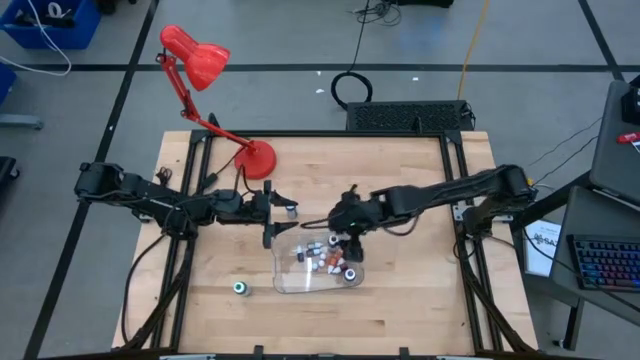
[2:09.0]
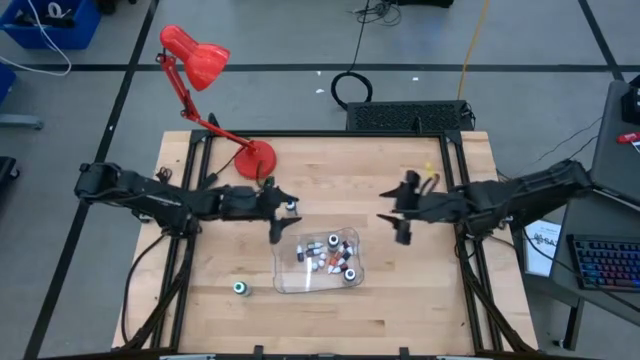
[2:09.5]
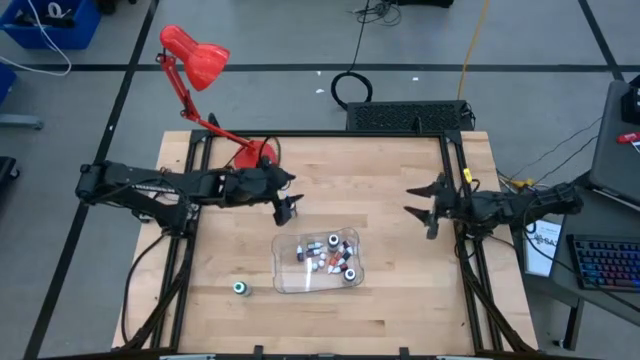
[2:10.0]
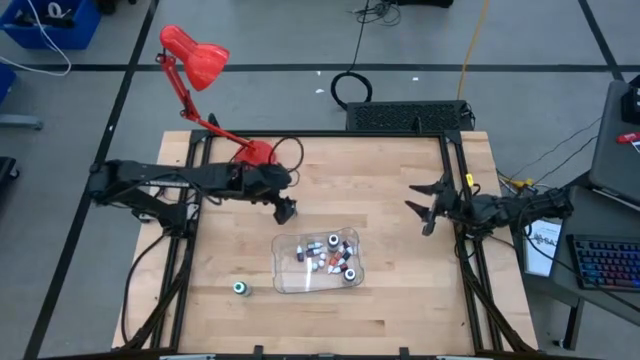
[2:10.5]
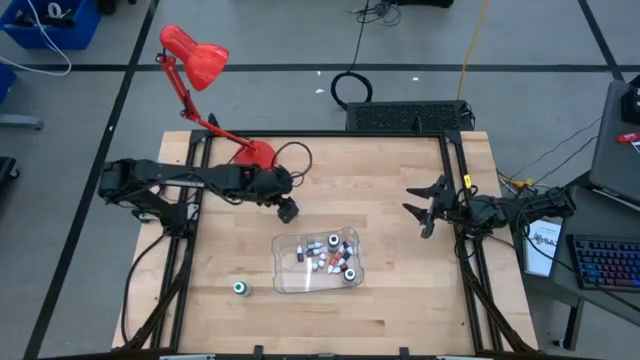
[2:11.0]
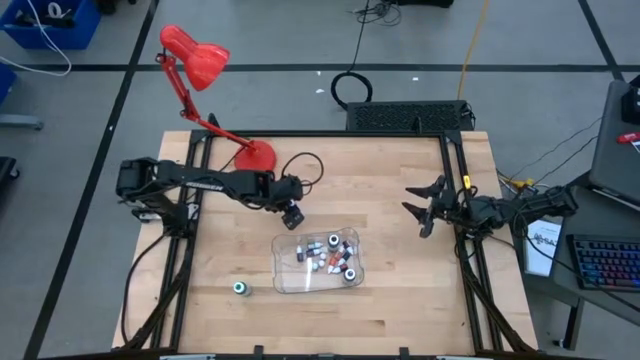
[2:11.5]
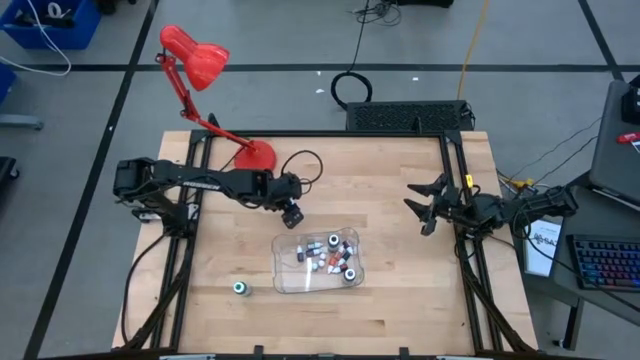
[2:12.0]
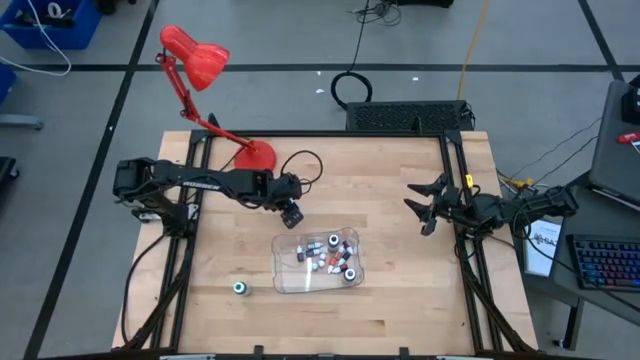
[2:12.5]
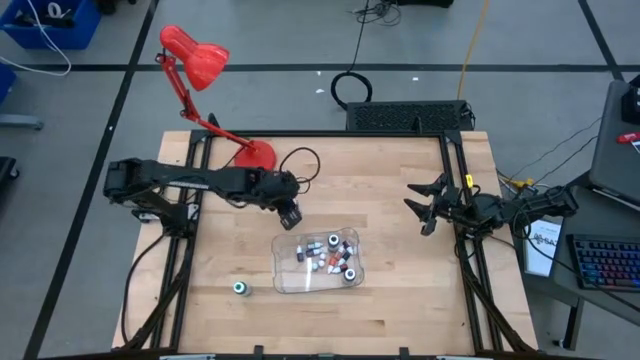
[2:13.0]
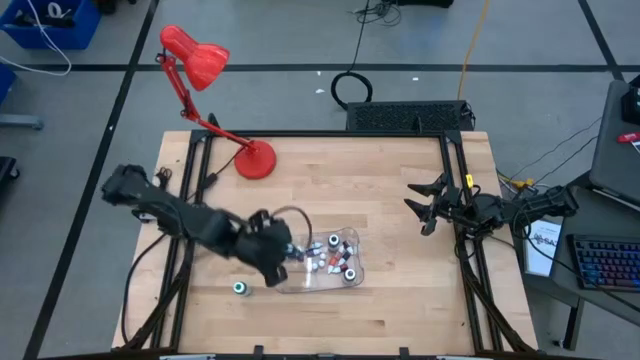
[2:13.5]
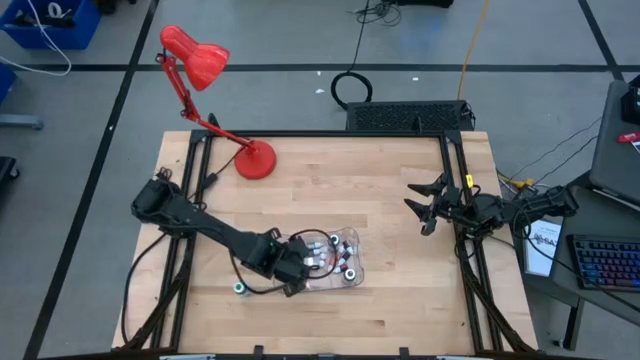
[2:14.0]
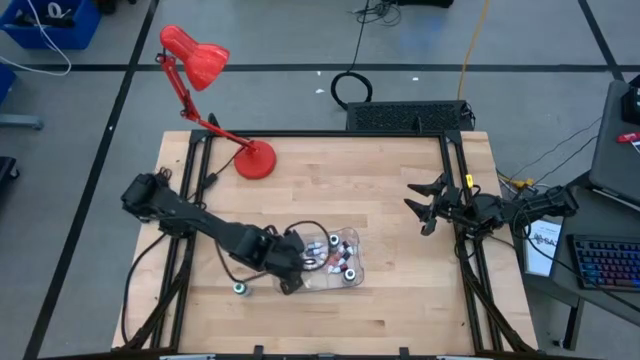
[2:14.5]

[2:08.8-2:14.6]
Task: Pick & Place food coloring
Put the large blue food coloring into the bin

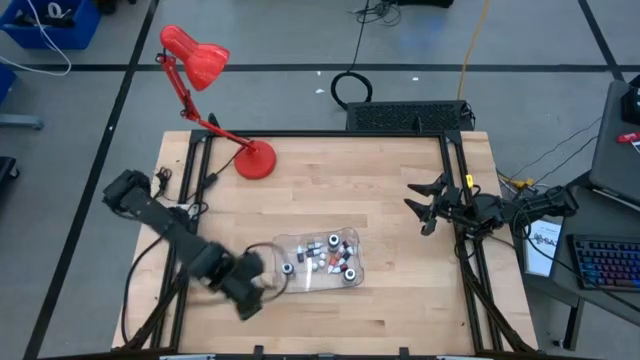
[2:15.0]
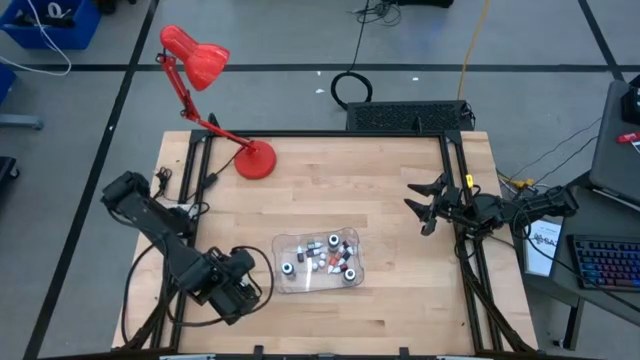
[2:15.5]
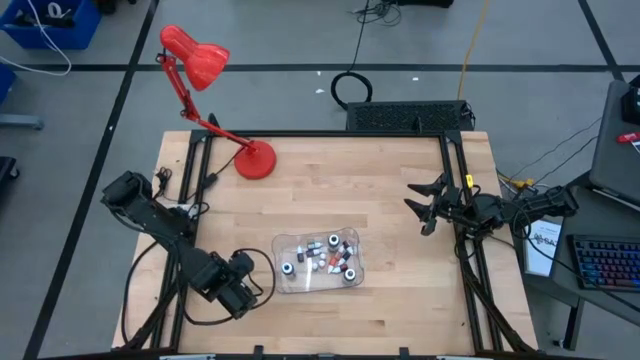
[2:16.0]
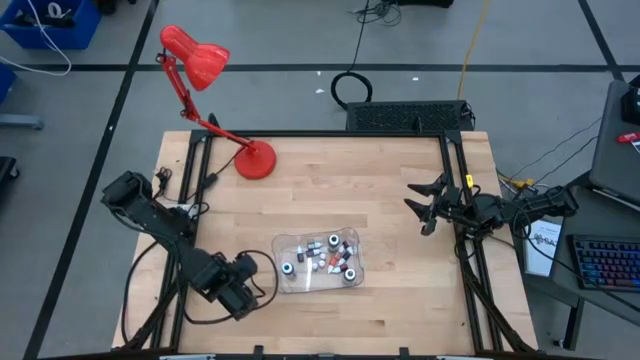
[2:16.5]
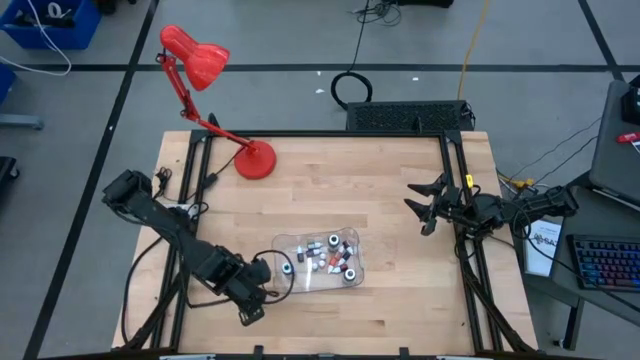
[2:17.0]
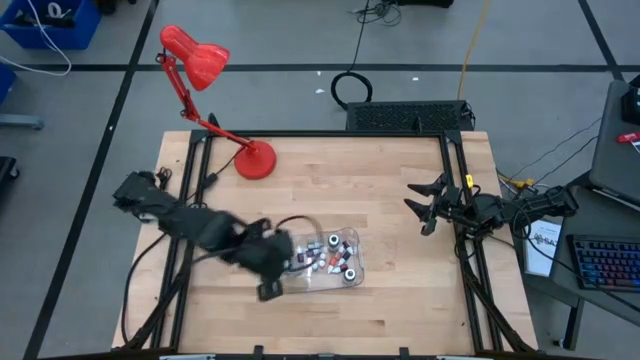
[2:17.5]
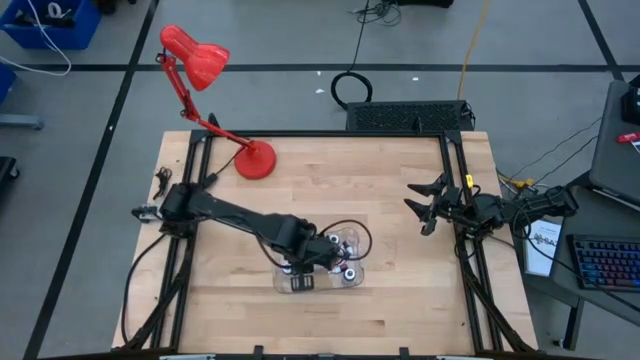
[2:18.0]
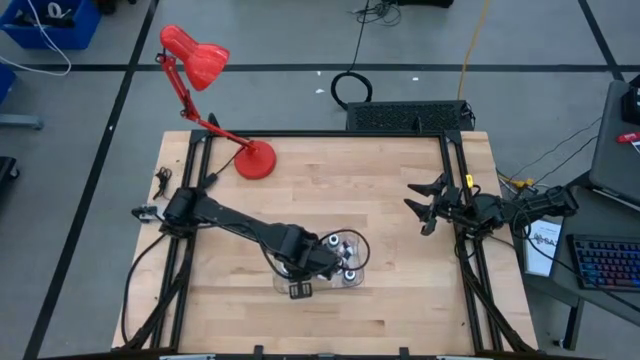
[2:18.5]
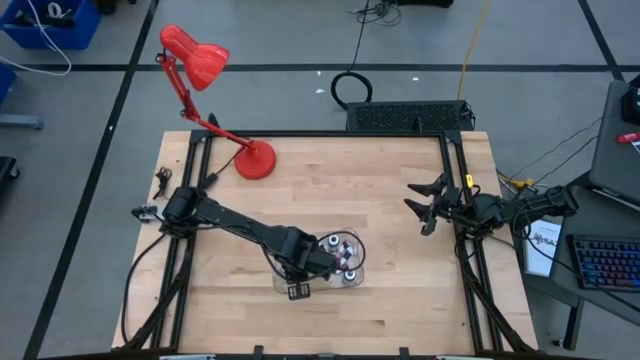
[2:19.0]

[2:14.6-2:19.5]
Put the large green food coloring into the bin

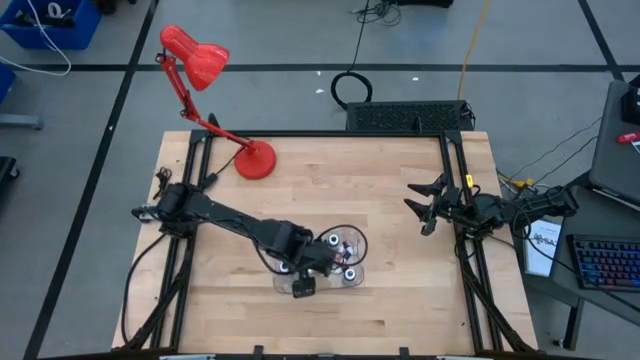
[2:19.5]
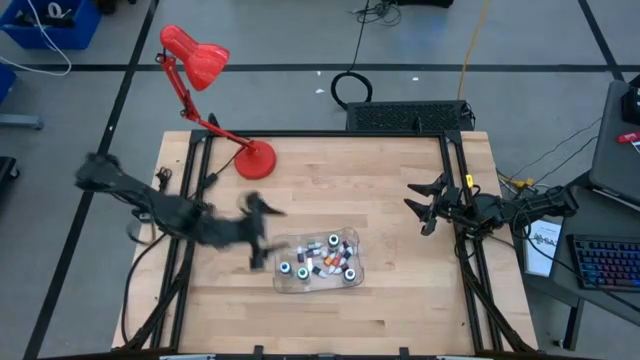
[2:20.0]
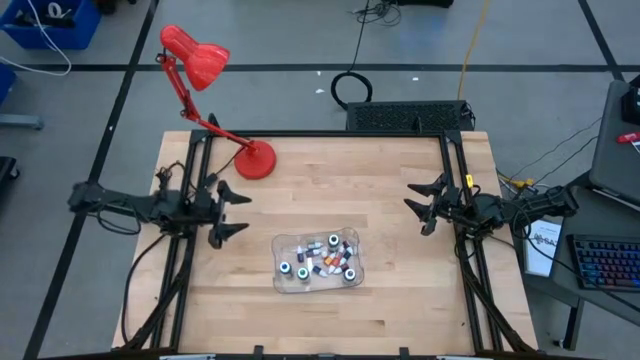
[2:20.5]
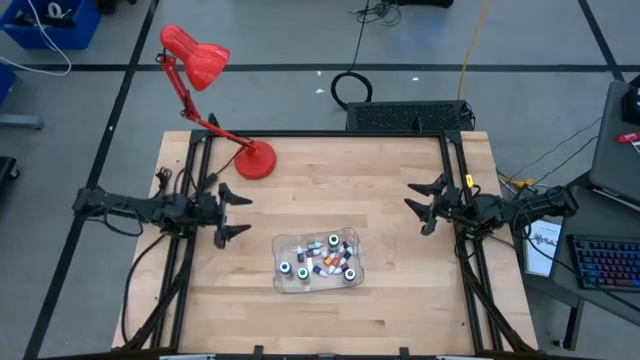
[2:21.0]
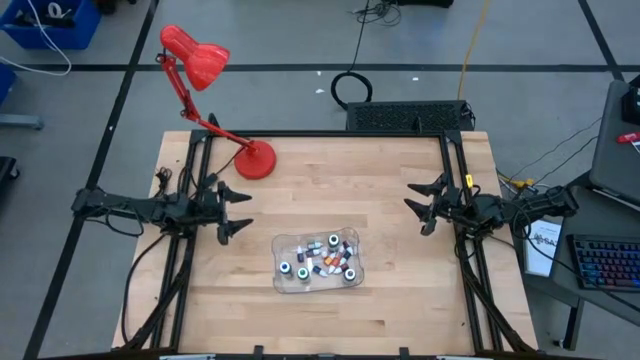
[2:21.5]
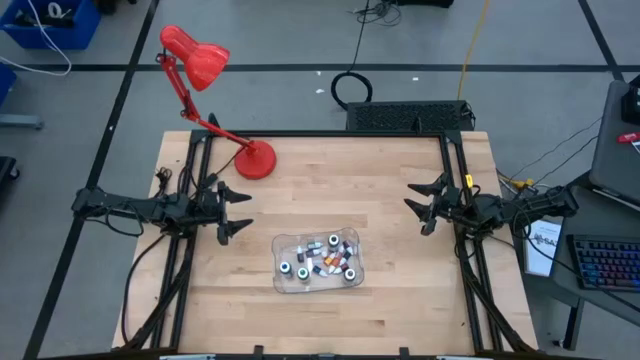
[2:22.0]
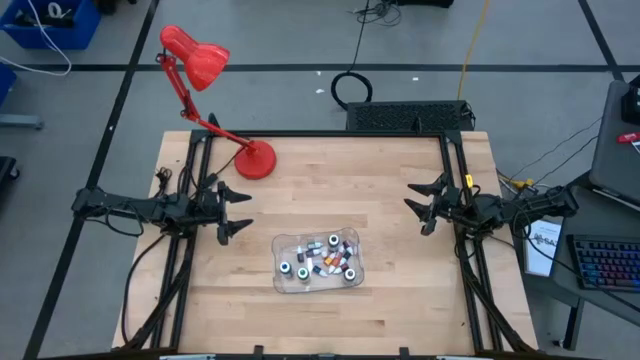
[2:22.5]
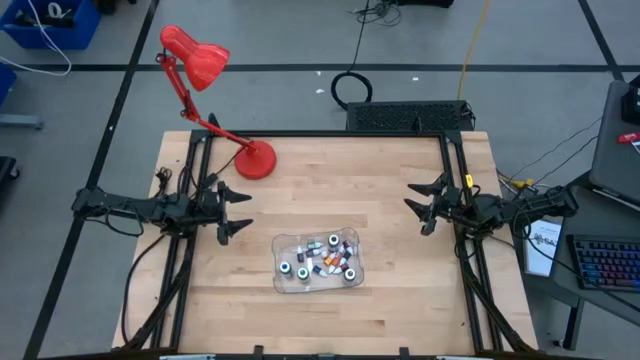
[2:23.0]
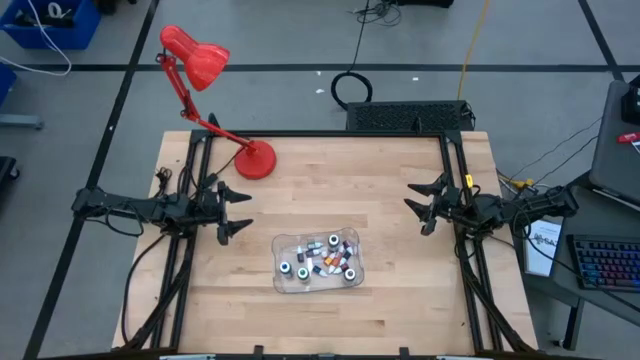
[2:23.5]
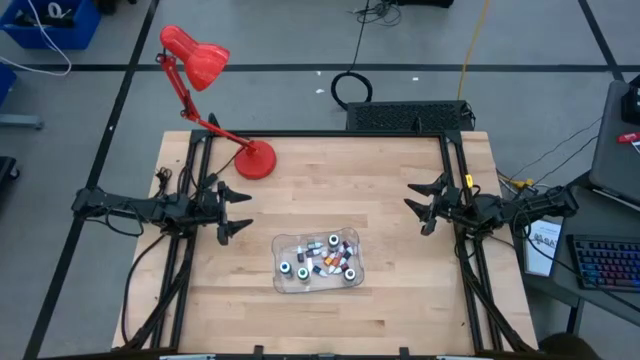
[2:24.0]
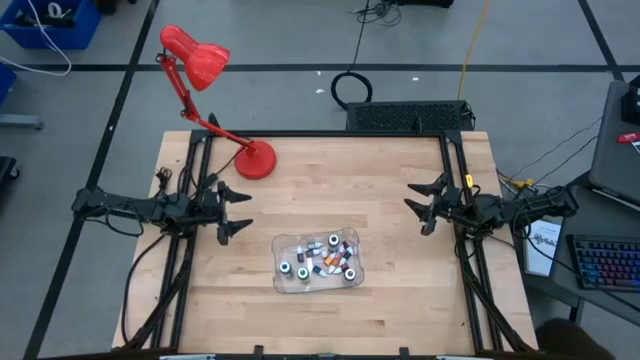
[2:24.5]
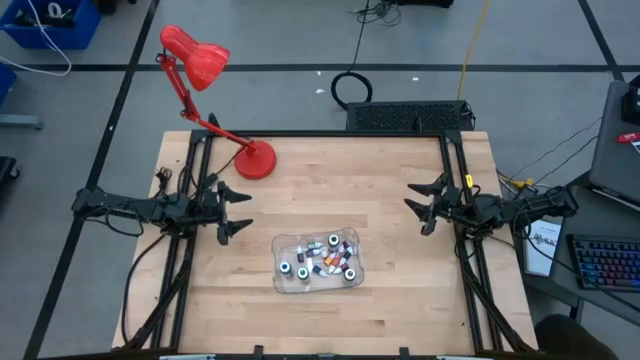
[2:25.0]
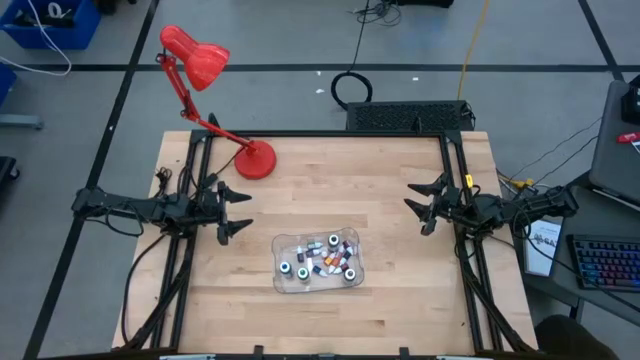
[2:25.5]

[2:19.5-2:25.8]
Return to Home Position

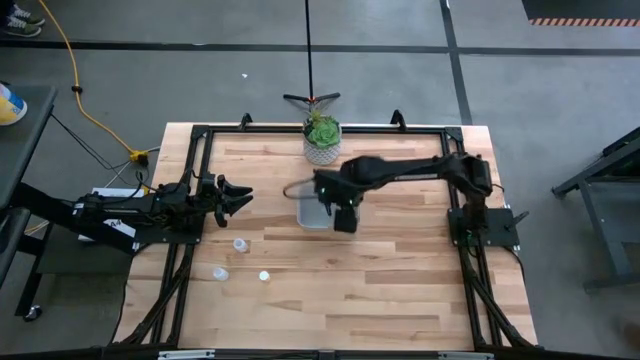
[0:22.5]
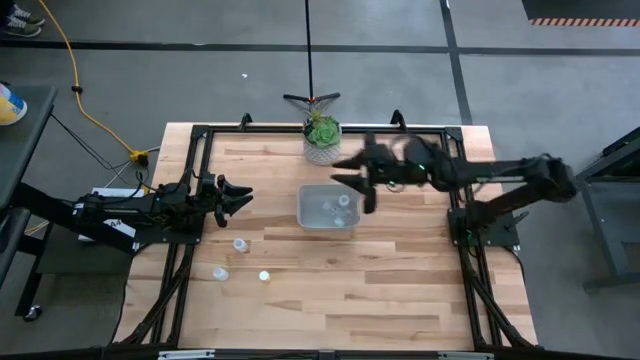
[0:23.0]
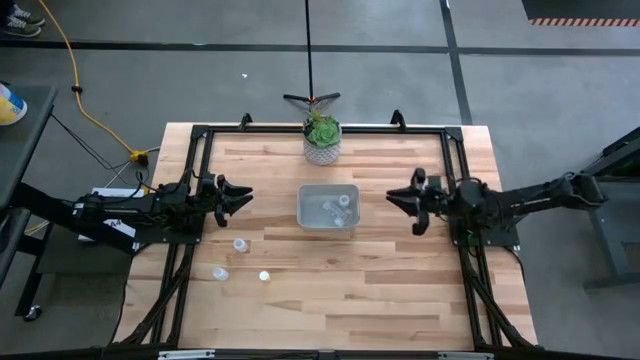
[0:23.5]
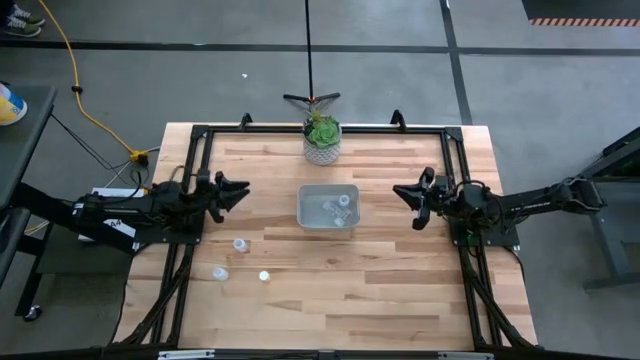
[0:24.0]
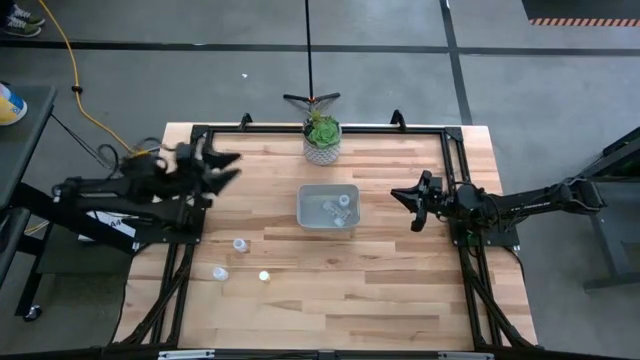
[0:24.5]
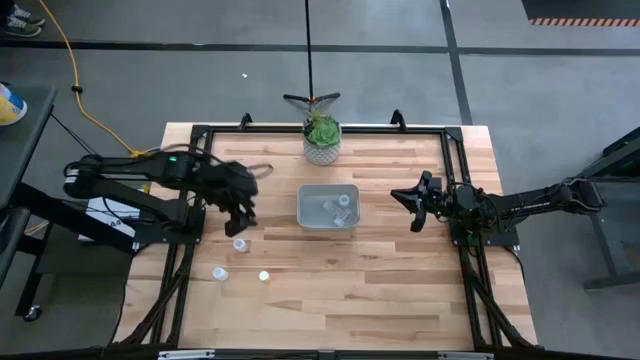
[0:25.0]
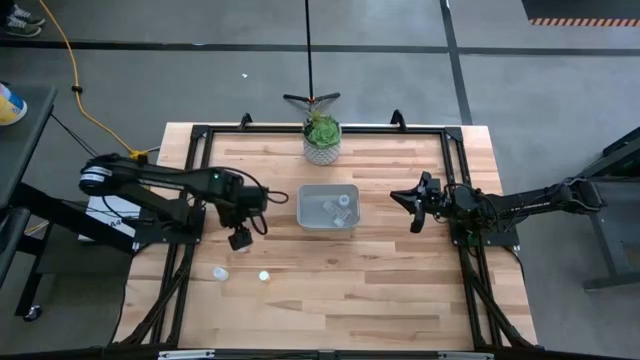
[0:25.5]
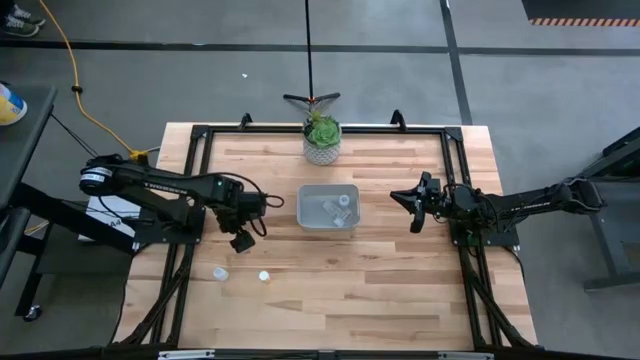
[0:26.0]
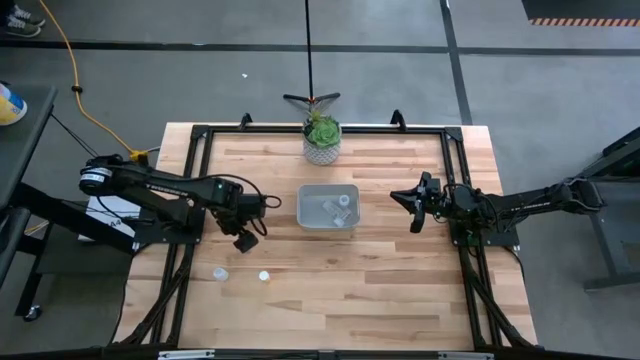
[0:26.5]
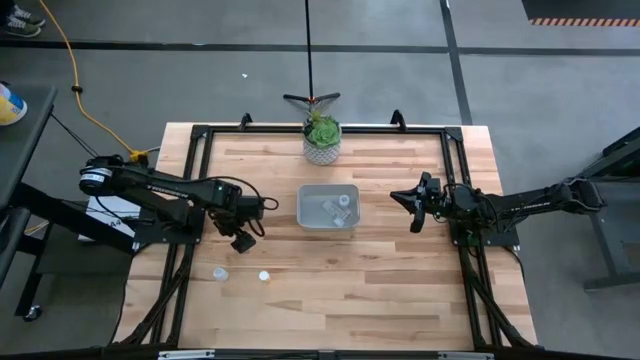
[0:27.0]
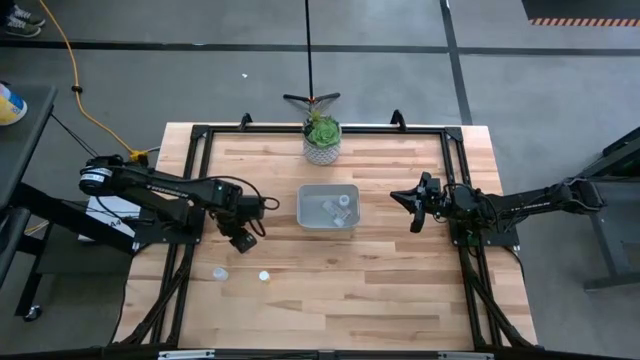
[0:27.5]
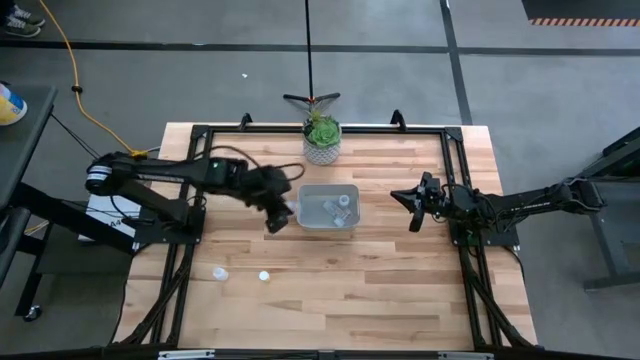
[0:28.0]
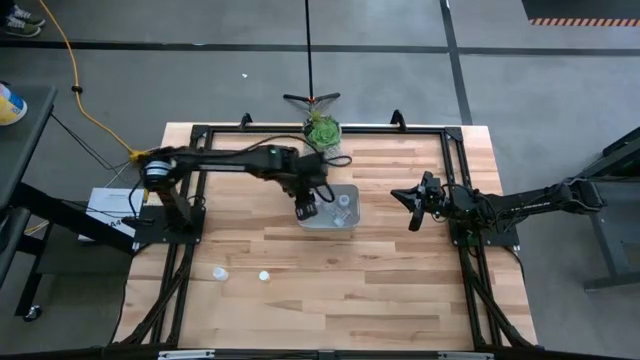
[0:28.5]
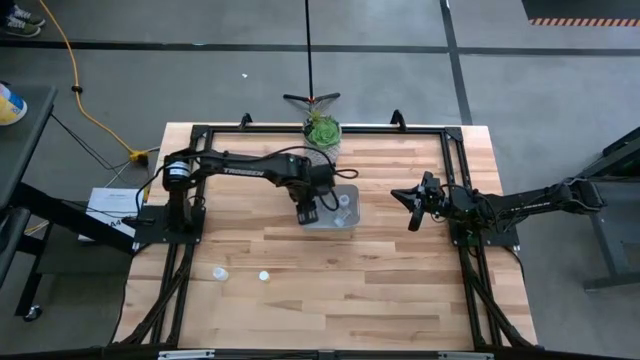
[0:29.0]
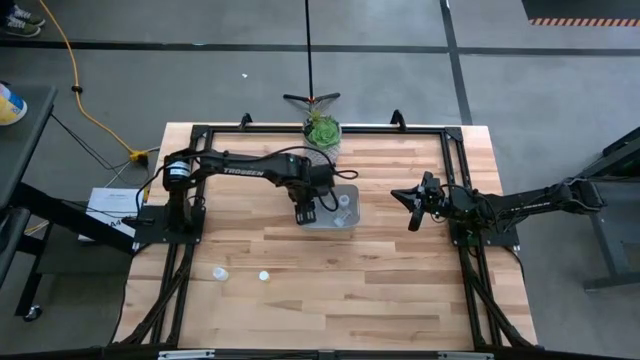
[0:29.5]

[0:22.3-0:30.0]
Task: Pick and place pill bottles into a basket
Put the transparent pill bottle into the gray bin
